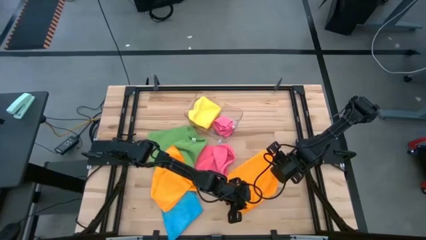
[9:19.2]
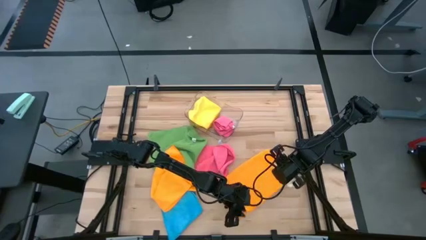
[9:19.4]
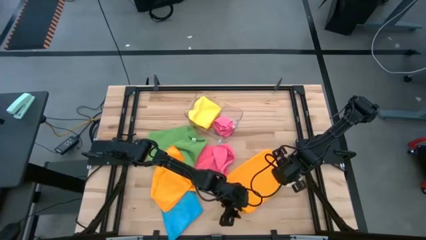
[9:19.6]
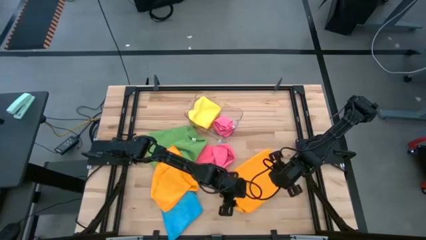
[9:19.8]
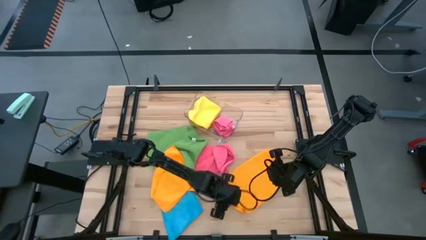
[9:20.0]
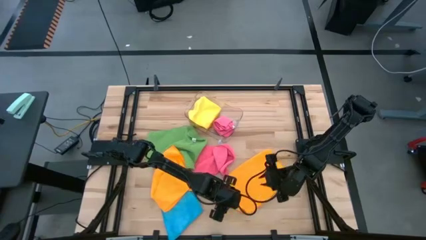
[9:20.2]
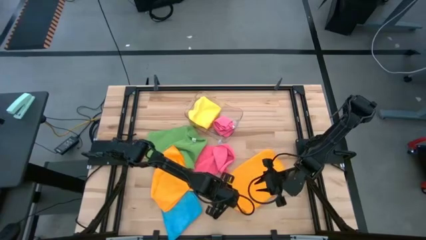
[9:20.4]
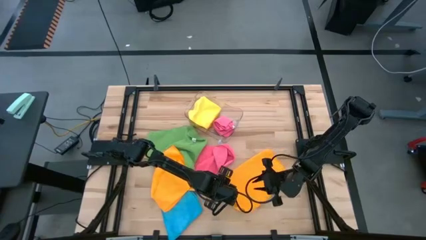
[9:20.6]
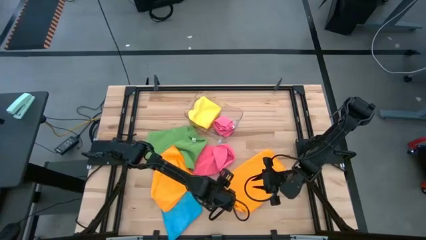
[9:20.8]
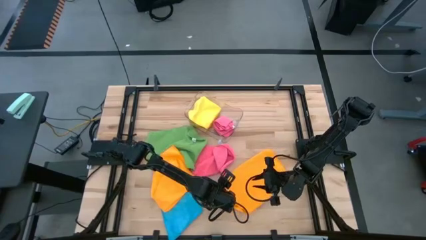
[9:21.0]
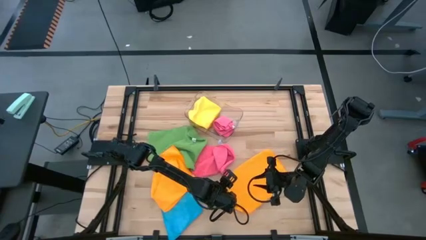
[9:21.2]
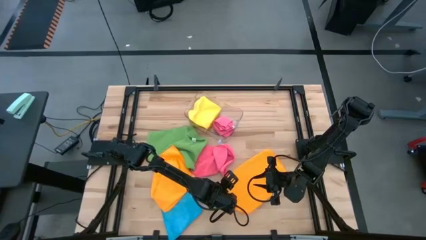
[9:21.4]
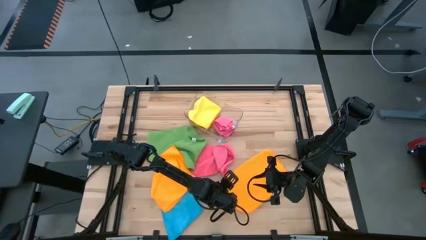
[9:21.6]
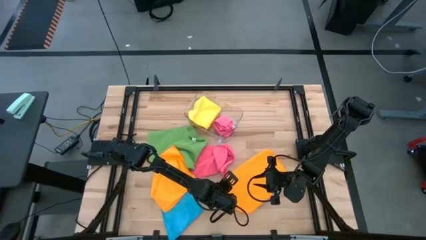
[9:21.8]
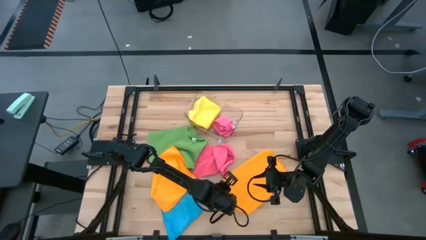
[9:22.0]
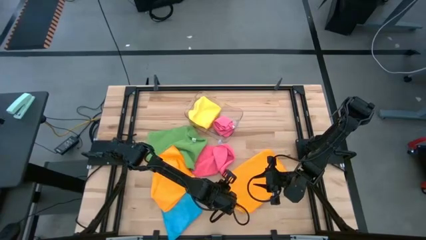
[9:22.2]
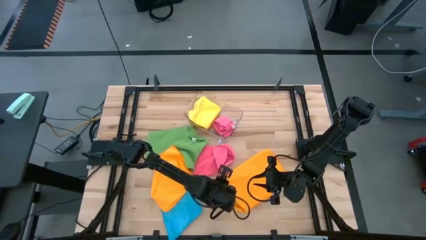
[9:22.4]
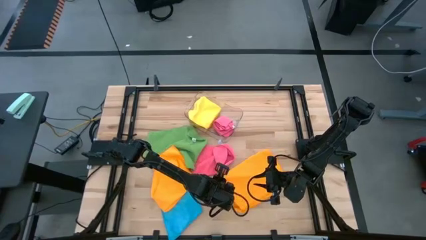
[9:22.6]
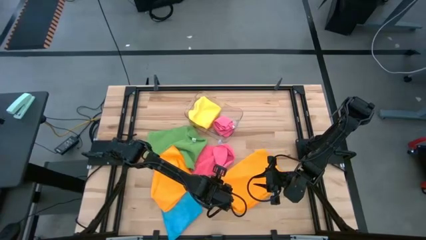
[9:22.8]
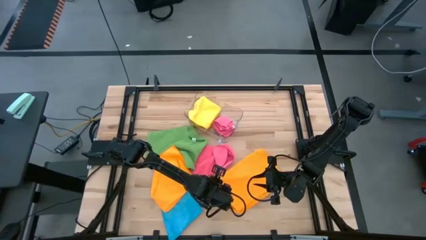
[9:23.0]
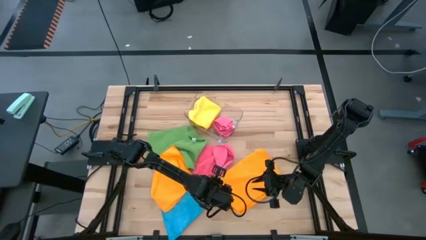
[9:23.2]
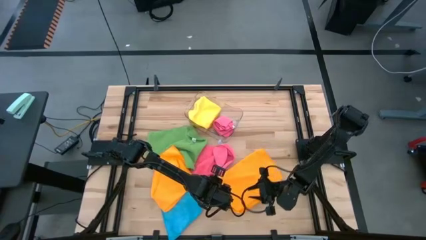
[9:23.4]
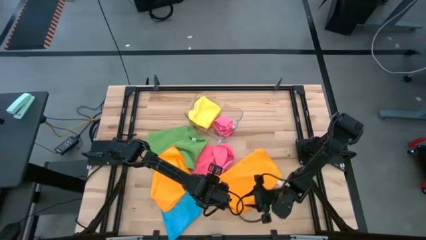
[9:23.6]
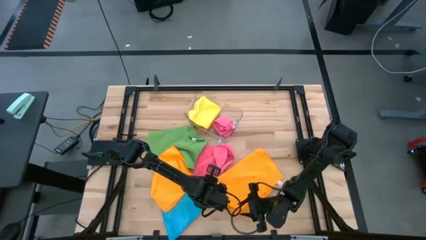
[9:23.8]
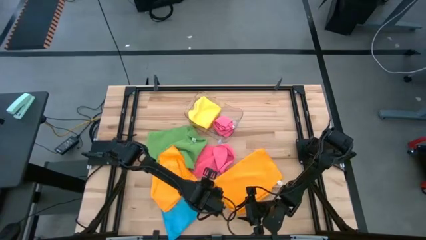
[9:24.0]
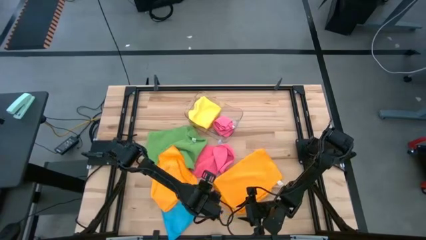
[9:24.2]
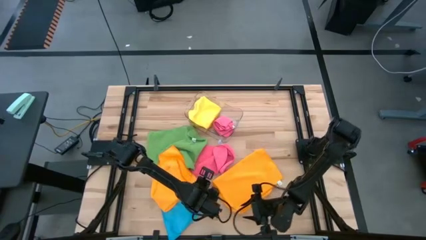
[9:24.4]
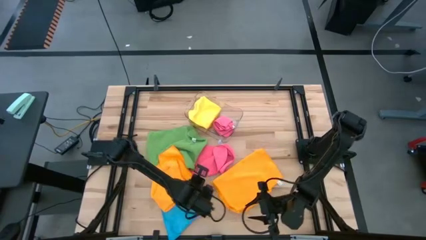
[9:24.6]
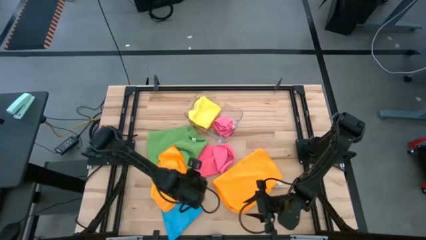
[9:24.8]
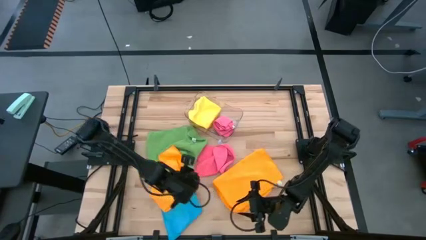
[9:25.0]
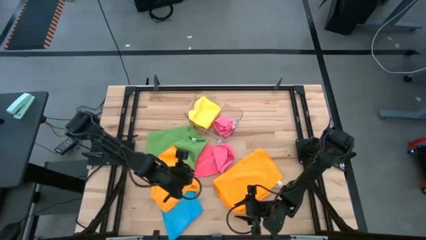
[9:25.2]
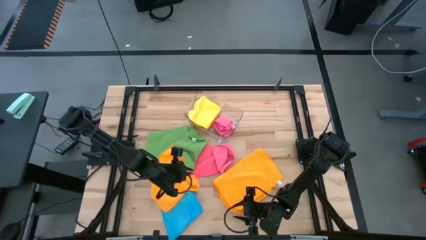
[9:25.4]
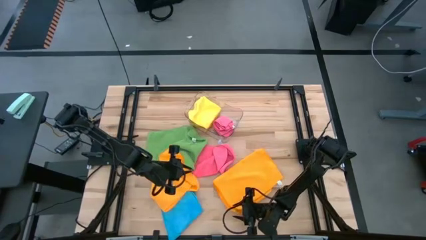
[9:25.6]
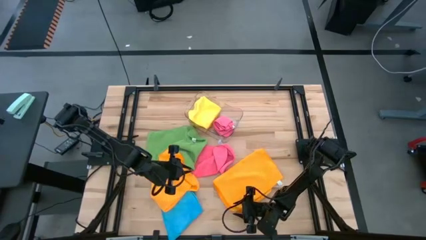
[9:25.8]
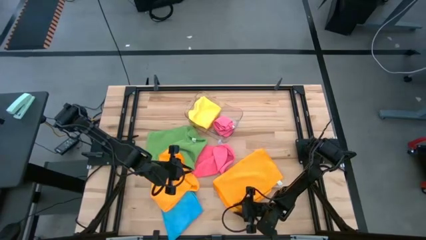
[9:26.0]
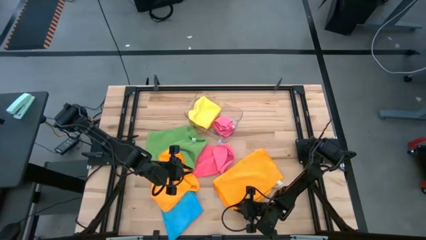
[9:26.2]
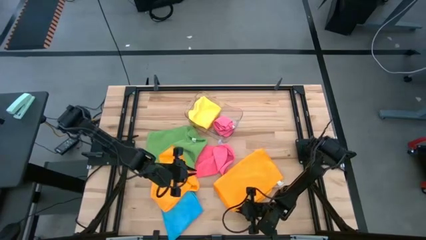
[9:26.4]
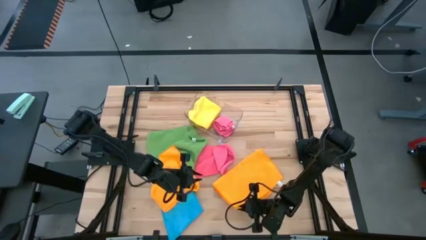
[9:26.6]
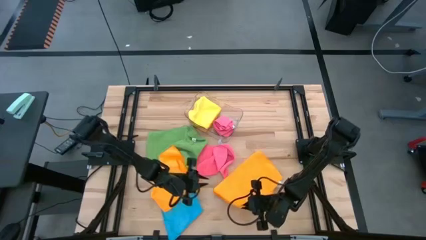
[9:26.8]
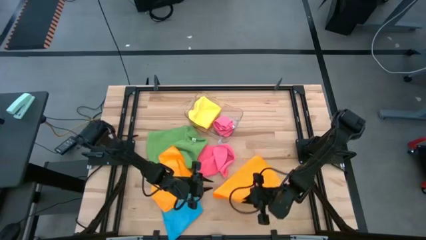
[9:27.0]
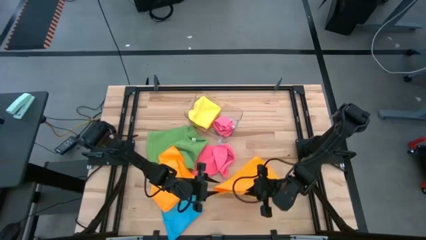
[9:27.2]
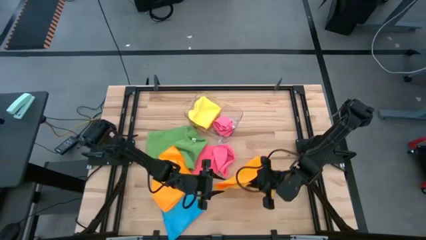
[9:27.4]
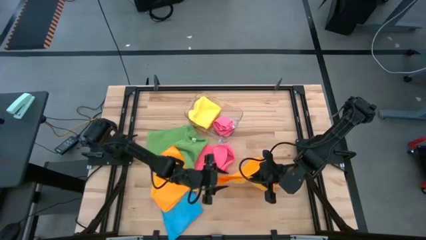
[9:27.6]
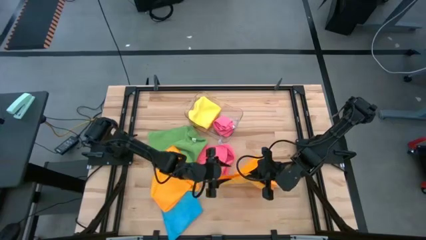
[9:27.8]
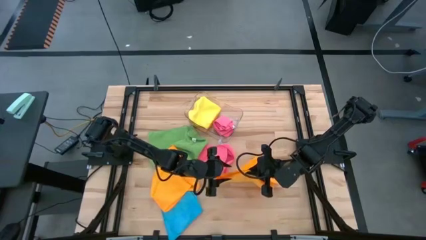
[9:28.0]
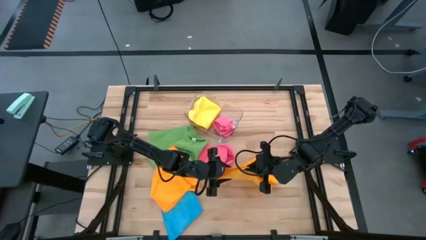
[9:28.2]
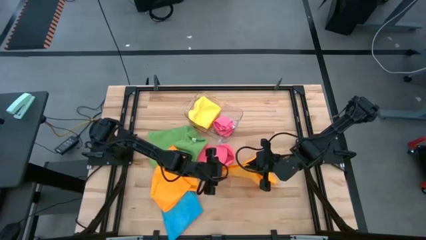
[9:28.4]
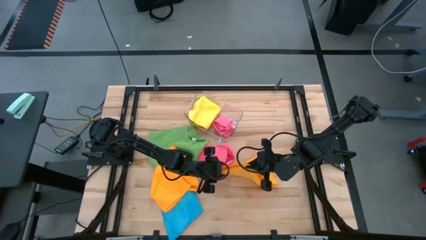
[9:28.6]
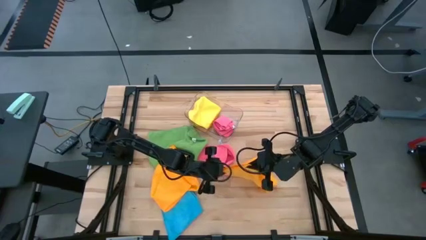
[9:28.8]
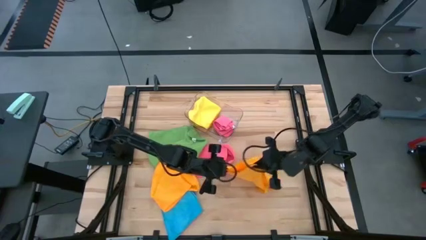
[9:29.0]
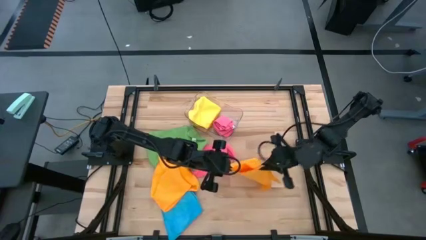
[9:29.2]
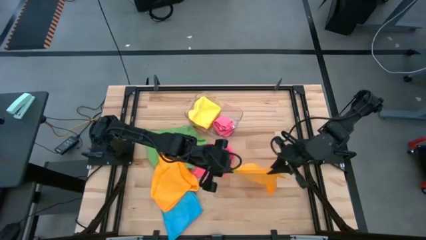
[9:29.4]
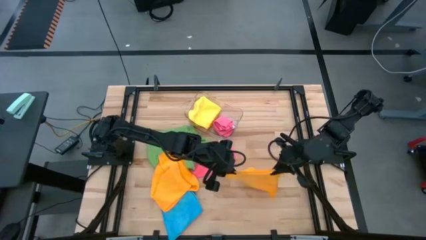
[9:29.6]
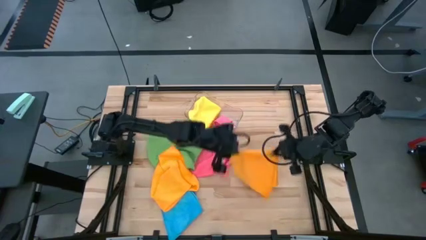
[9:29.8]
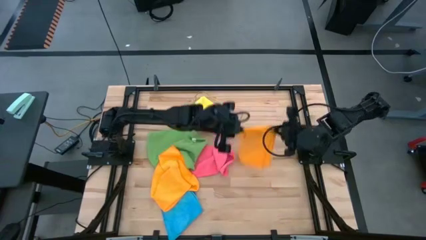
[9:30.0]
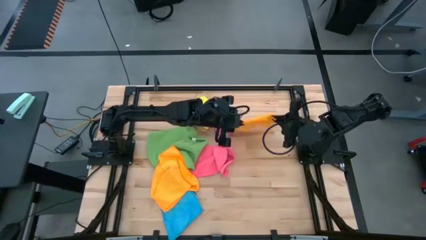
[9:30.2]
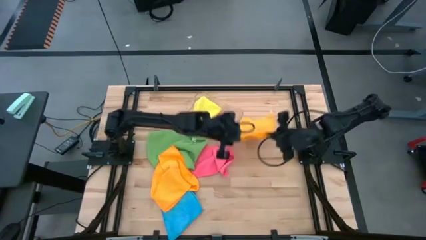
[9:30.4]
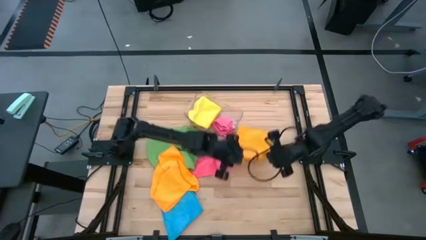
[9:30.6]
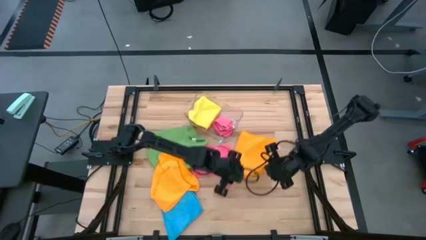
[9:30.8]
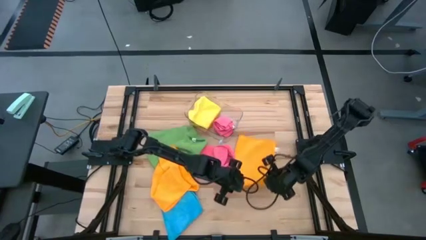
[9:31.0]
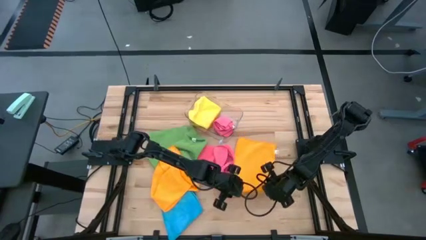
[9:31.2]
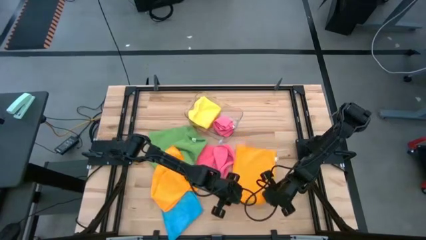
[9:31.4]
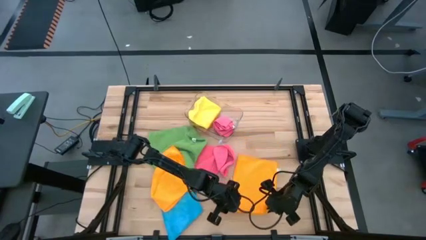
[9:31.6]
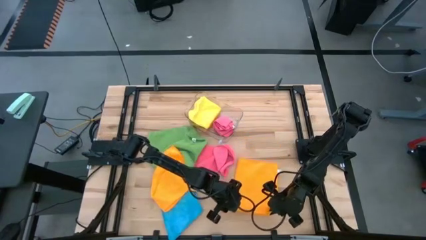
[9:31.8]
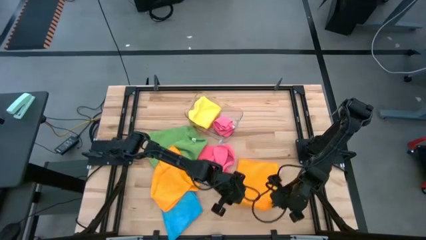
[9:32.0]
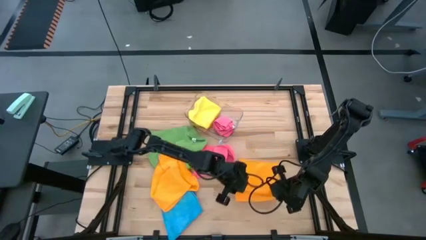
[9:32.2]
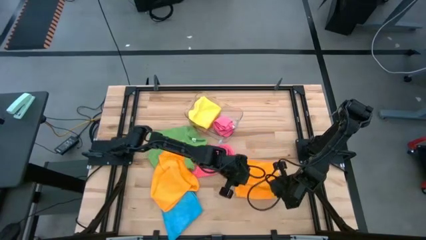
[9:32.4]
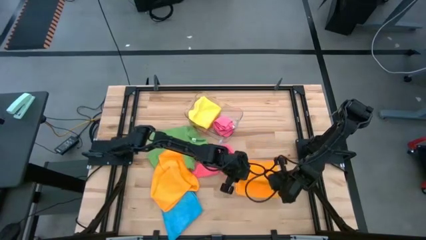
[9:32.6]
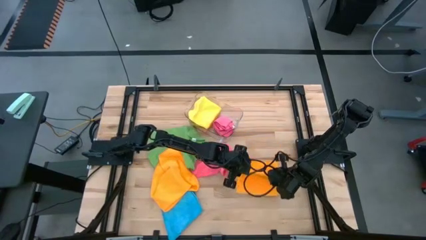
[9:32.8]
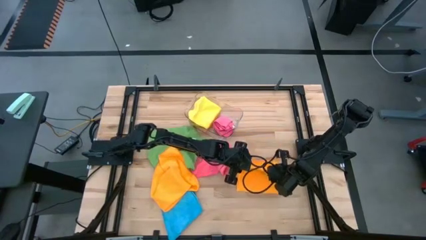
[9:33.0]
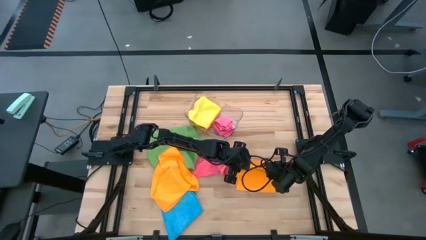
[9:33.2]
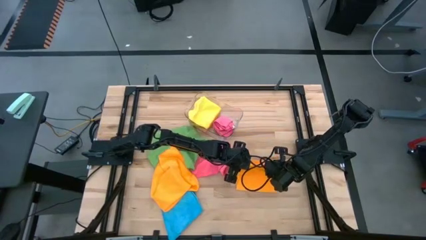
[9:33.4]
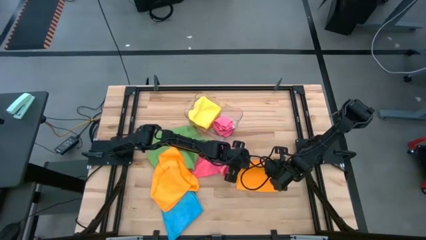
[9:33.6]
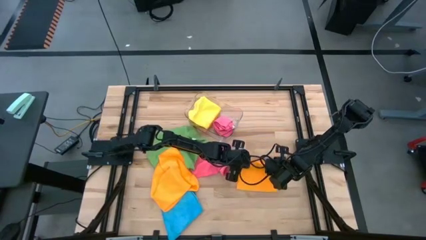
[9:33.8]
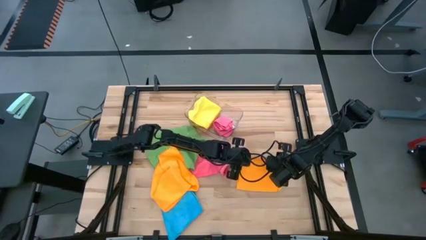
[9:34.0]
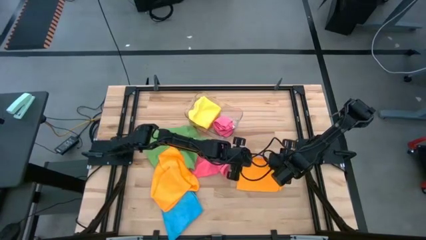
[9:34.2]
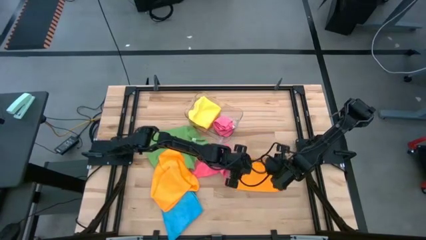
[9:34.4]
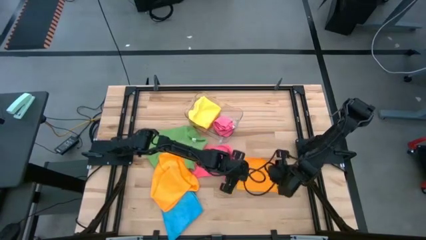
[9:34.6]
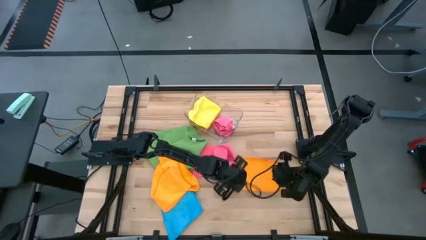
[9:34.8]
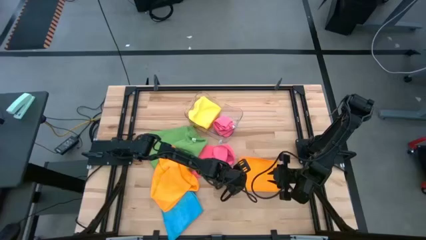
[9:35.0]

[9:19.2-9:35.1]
Task: Fold microfiber towels
Fold the right orange microfiber cloth
